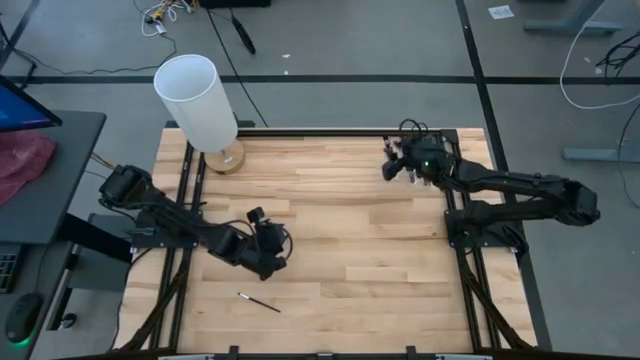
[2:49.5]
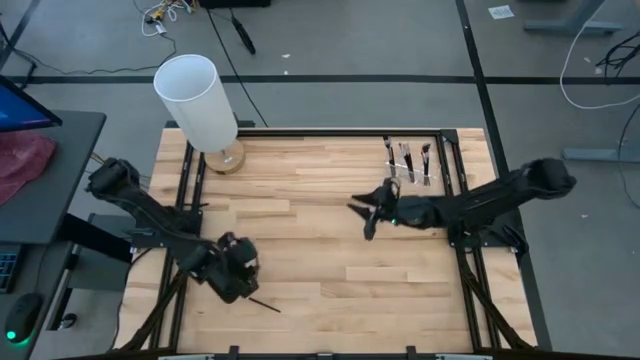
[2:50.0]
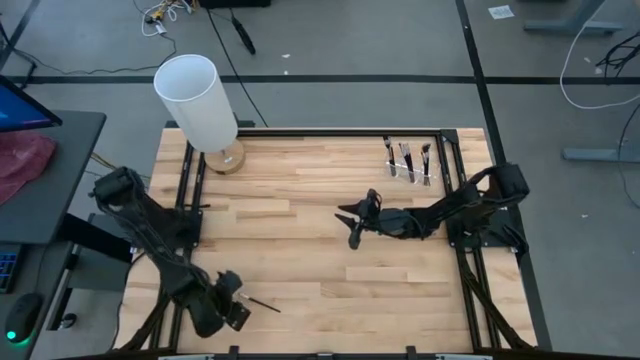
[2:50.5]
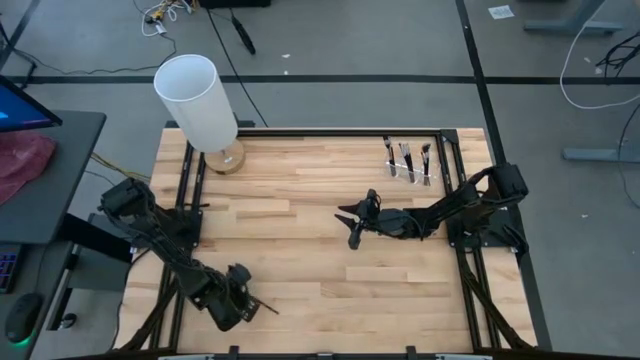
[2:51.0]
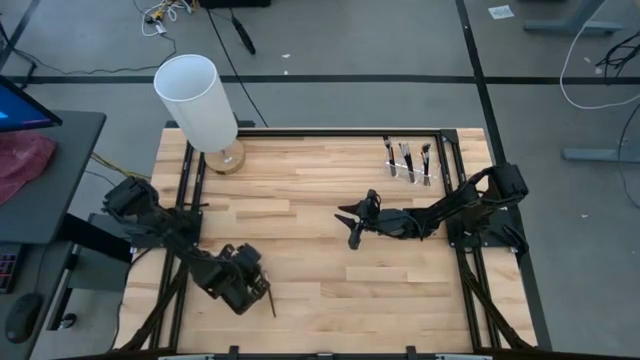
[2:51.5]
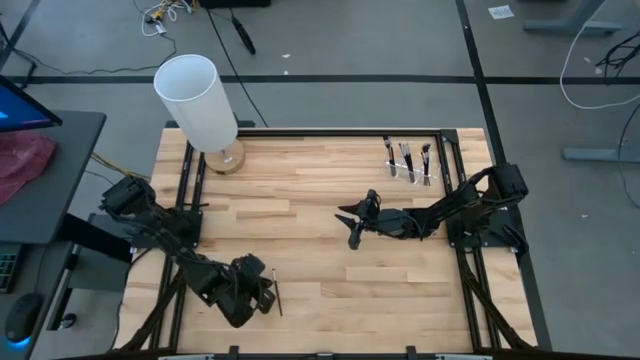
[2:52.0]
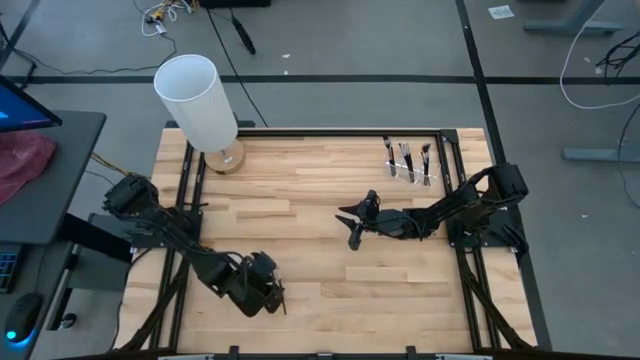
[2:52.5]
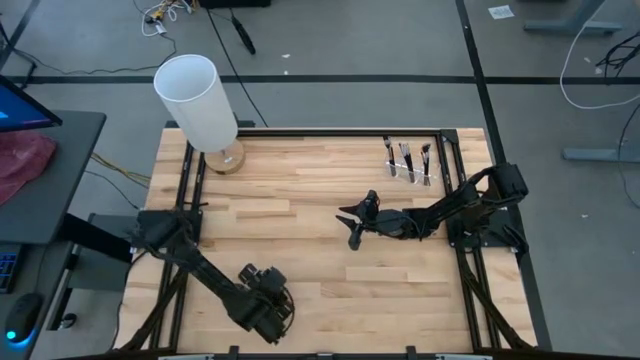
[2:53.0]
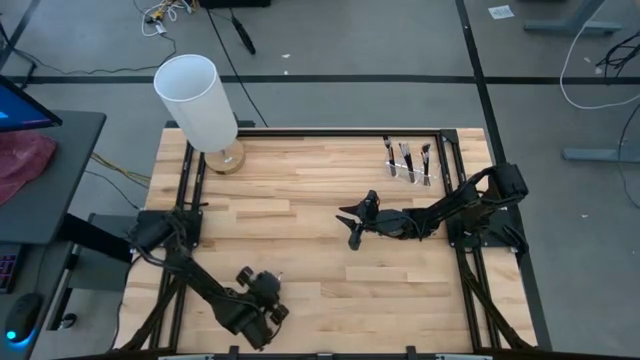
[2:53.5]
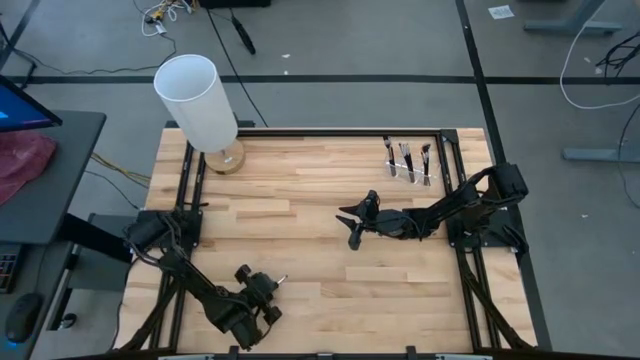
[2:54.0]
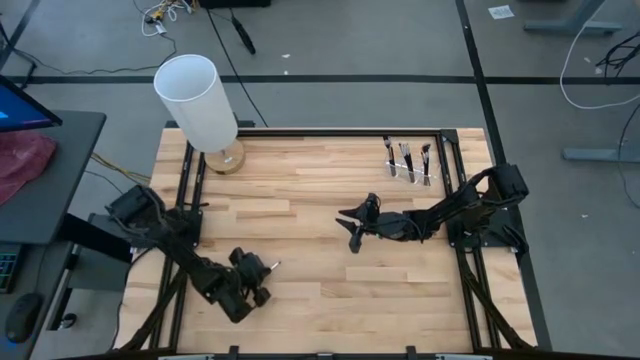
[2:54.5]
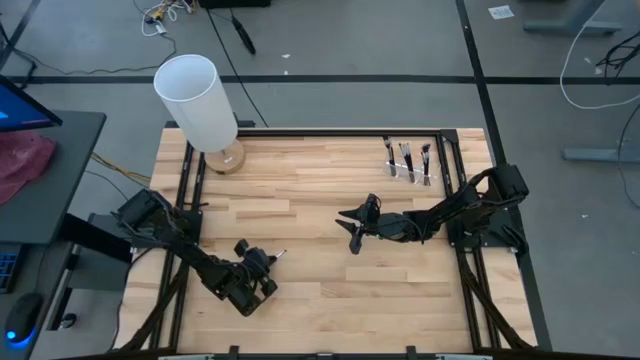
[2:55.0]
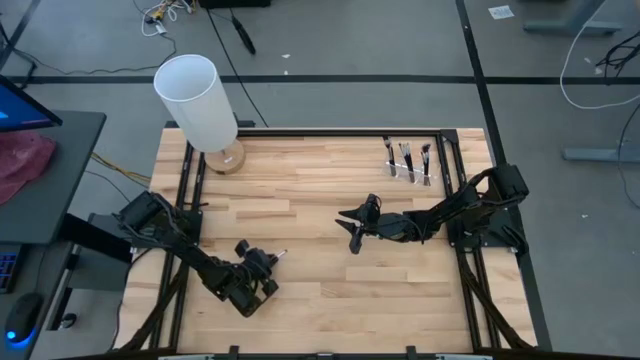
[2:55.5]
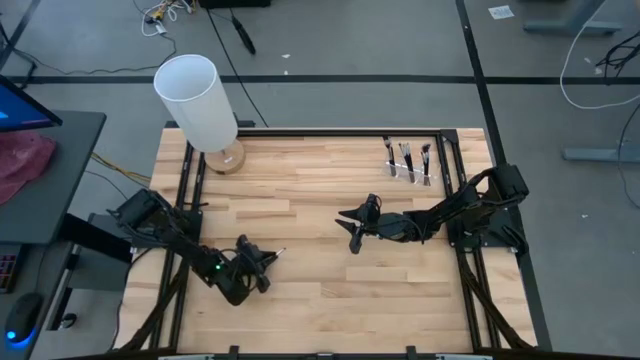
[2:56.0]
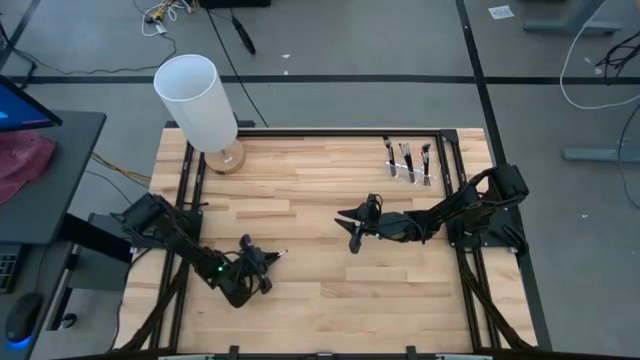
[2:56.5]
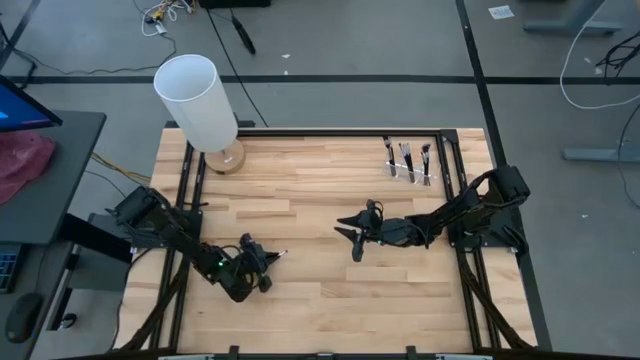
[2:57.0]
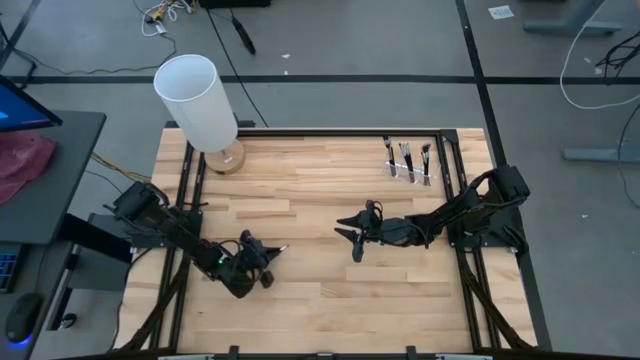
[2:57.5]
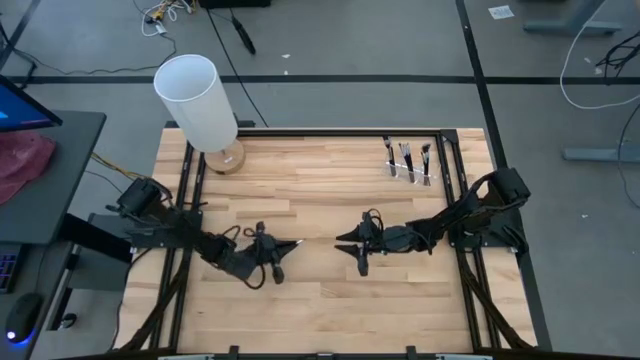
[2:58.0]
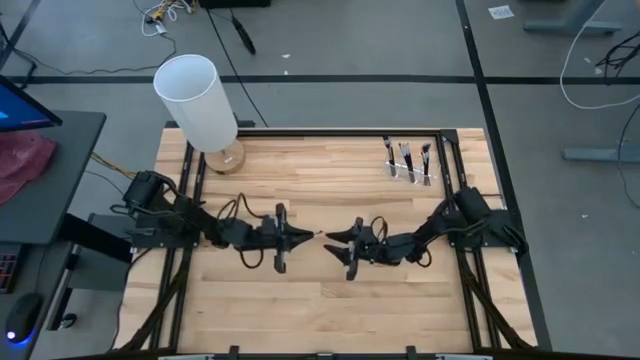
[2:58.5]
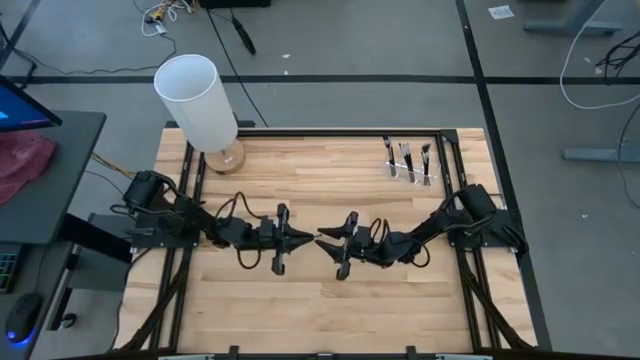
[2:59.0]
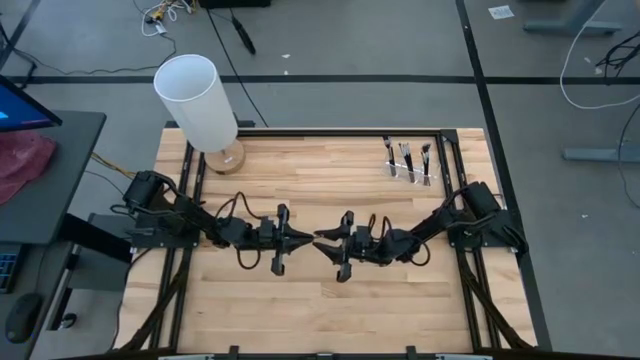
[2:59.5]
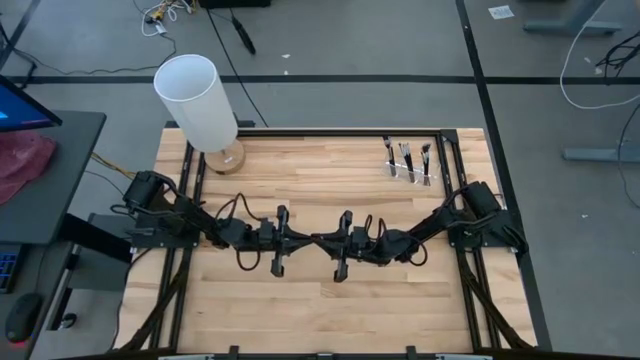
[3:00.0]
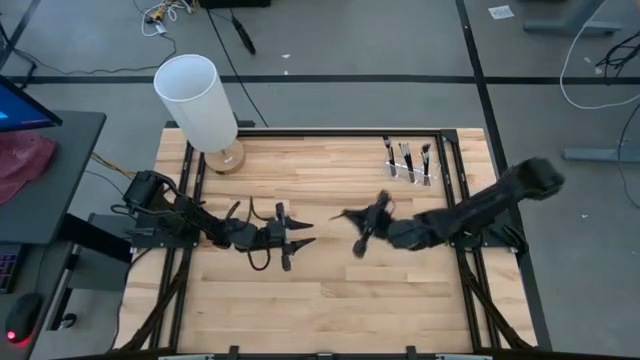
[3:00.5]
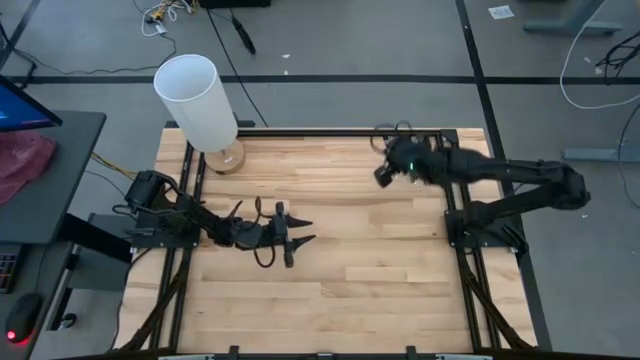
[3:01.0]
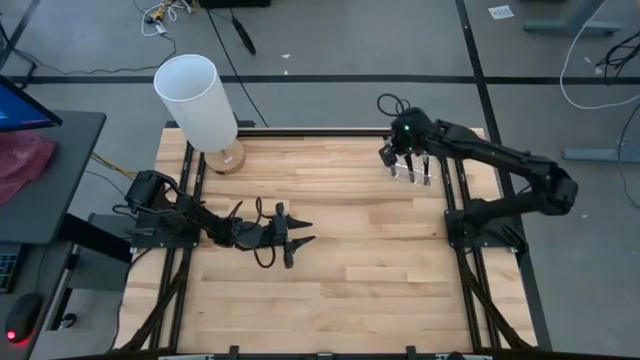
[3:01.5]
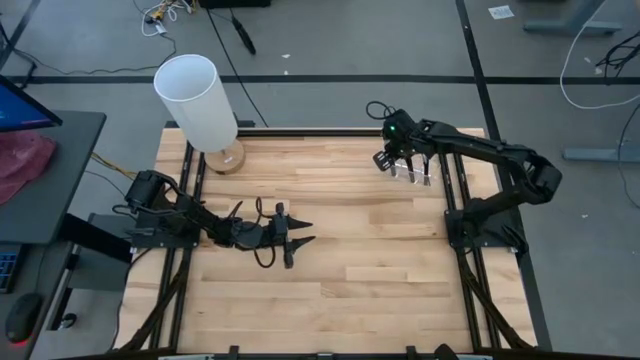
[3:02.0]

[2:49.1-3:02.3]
Task: Put items in baskets/containers
Put the eyeshadow brush into the transparent organizer

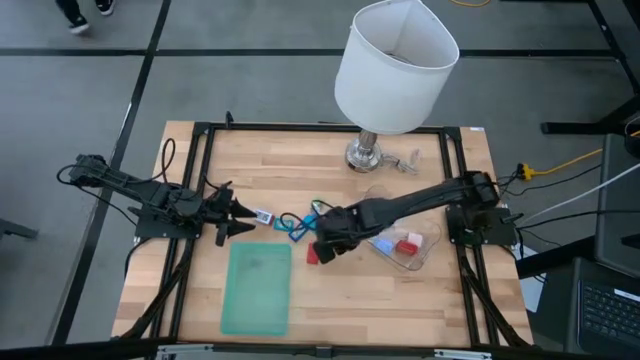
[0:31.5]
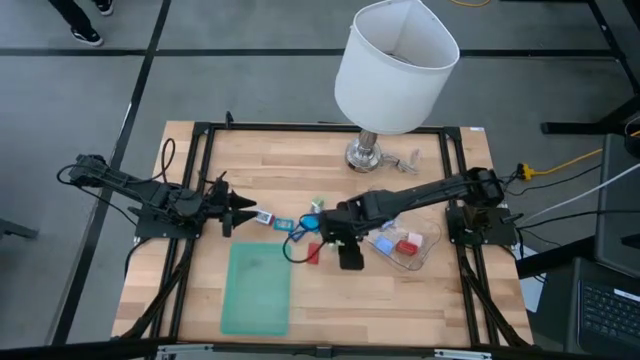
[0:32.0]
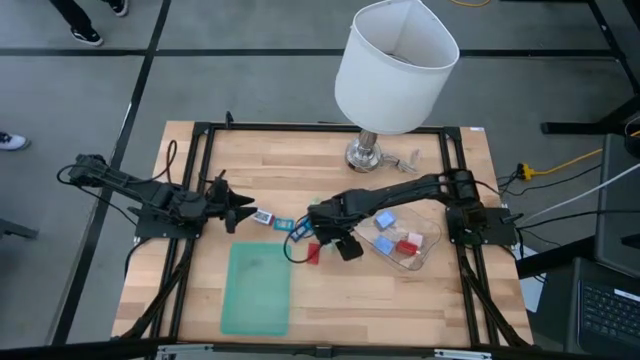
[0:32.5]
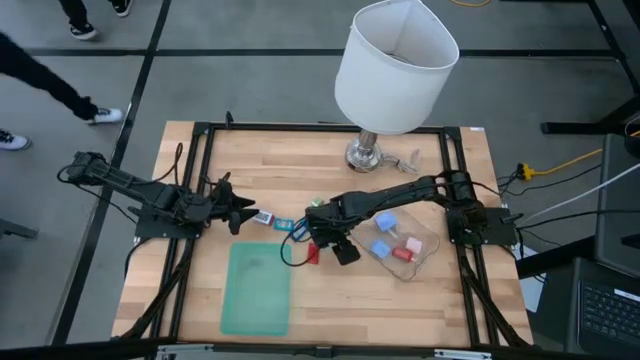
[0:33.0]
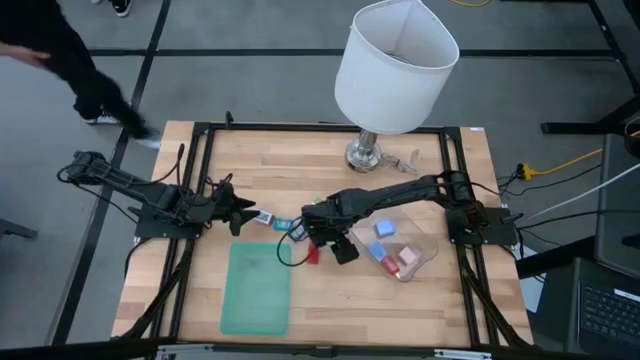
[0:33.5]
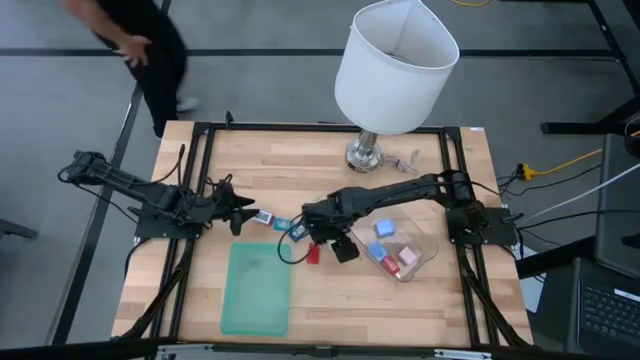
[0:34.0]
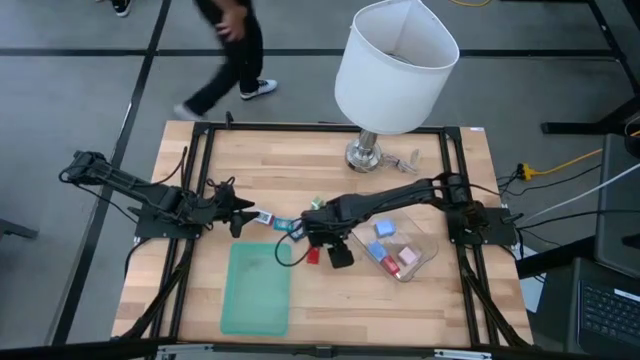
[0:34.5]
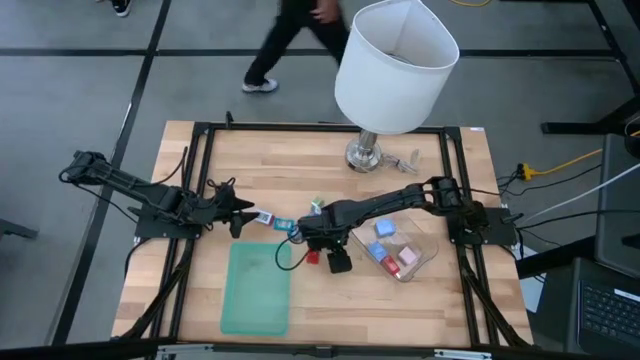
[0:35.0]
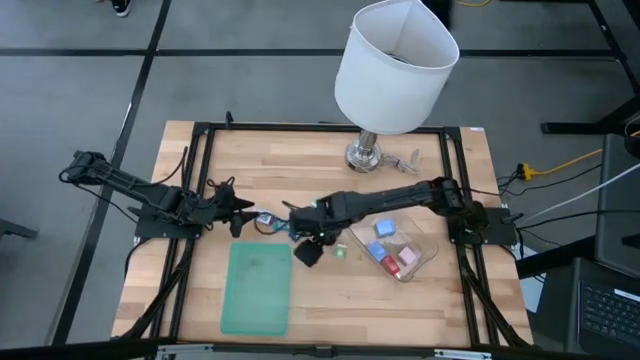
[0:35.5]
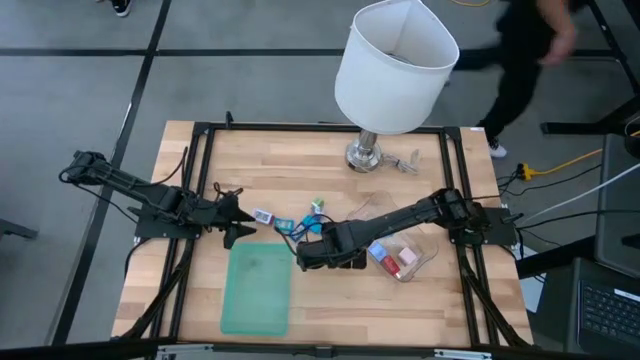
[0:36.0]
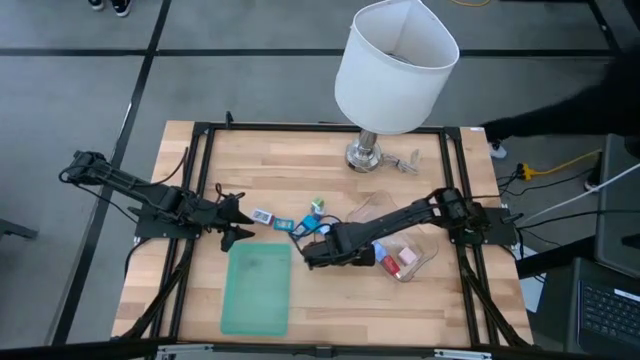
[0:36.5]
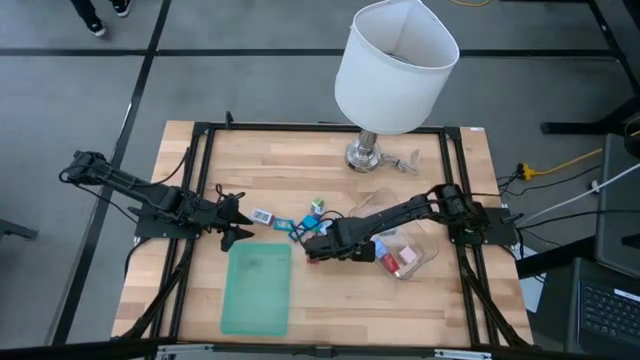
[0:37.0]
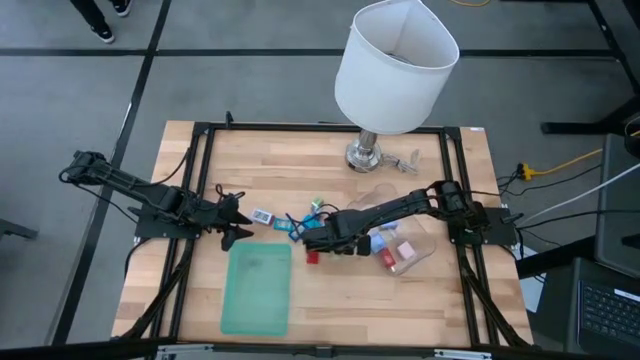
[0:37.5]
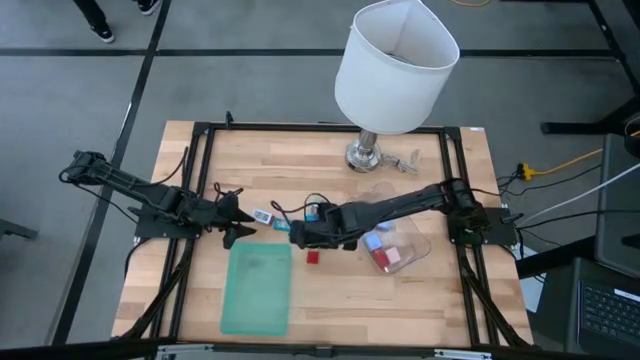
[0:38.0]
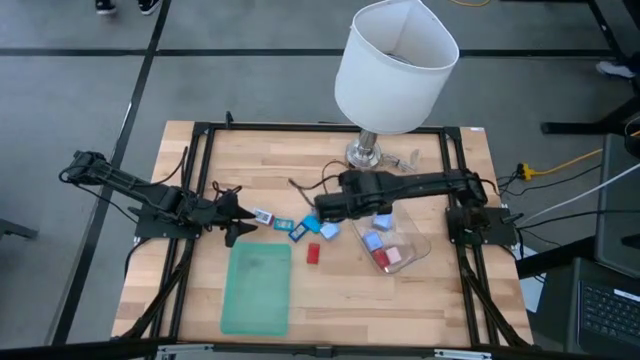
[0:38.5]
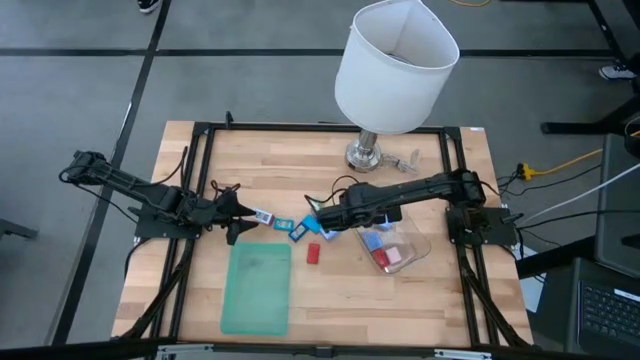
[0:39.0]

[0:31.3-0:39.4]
Task: Pick & Place Office items
Put the bottom green charger adapter into the transparent bin
